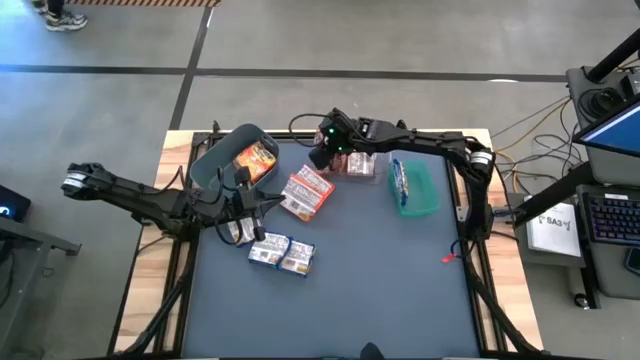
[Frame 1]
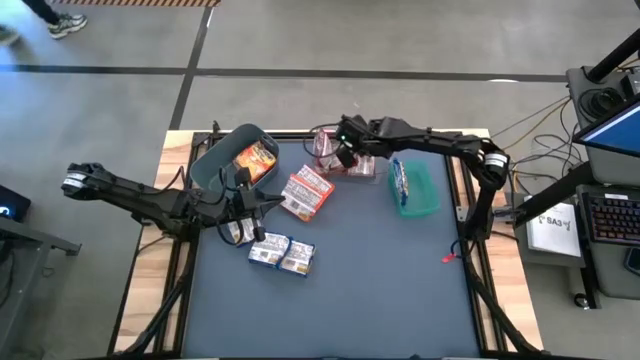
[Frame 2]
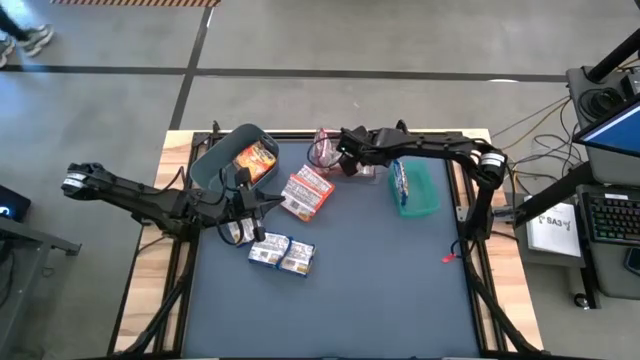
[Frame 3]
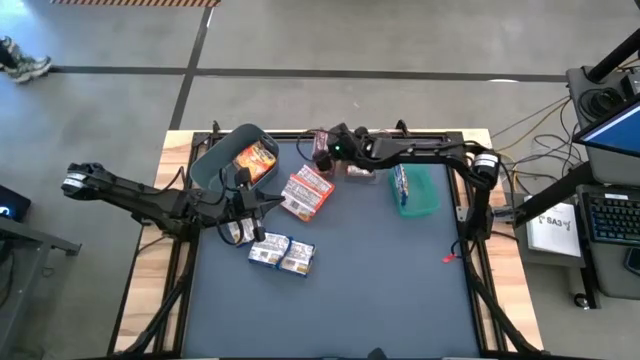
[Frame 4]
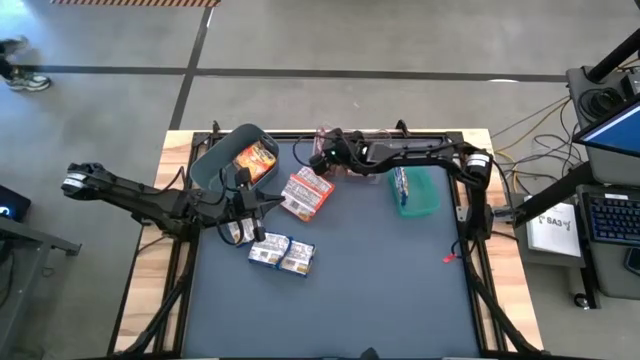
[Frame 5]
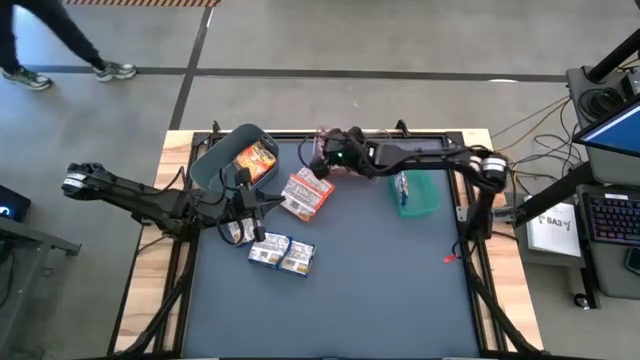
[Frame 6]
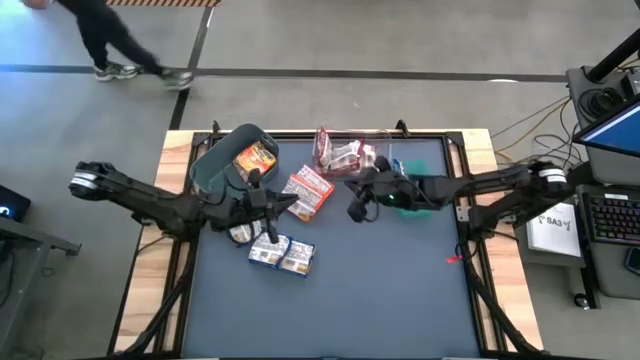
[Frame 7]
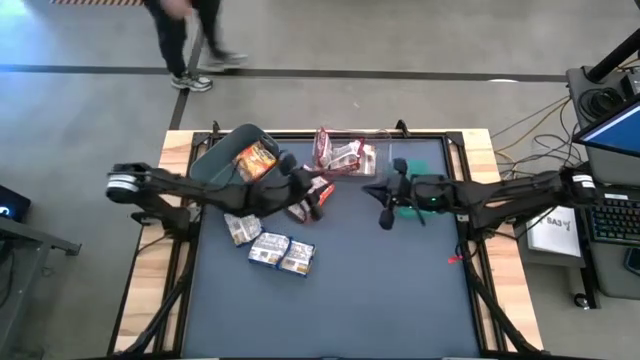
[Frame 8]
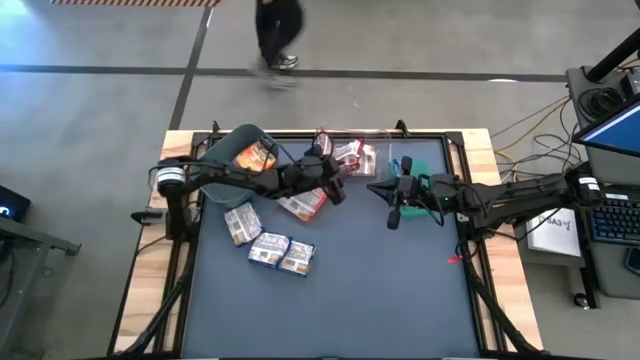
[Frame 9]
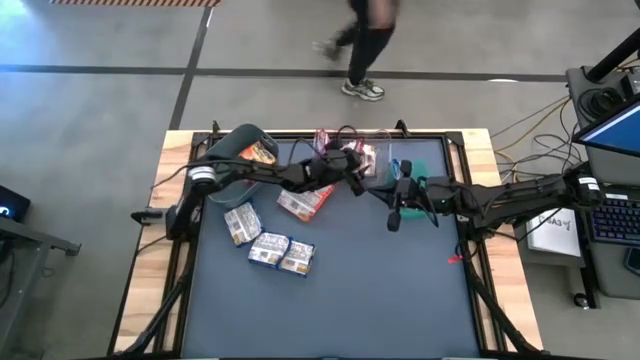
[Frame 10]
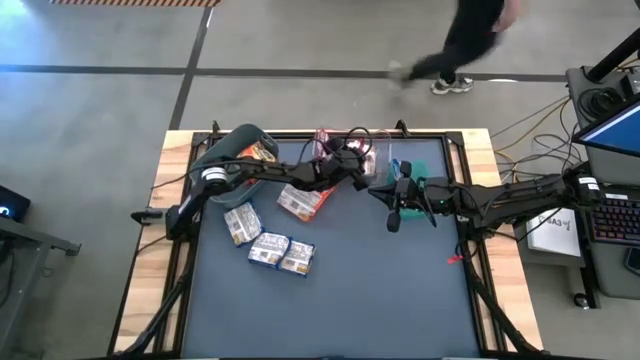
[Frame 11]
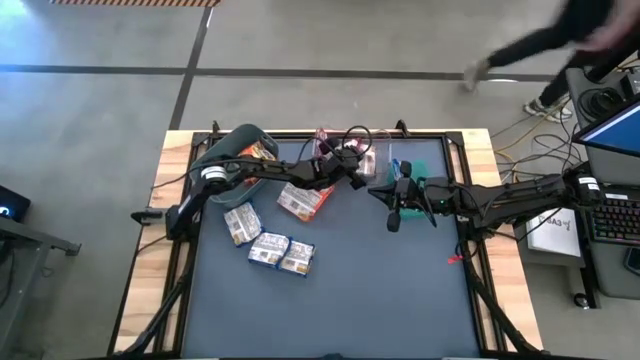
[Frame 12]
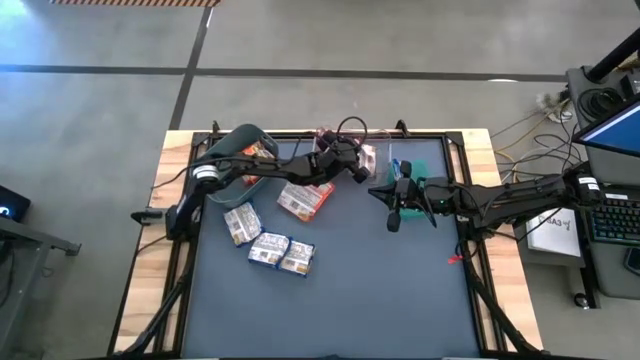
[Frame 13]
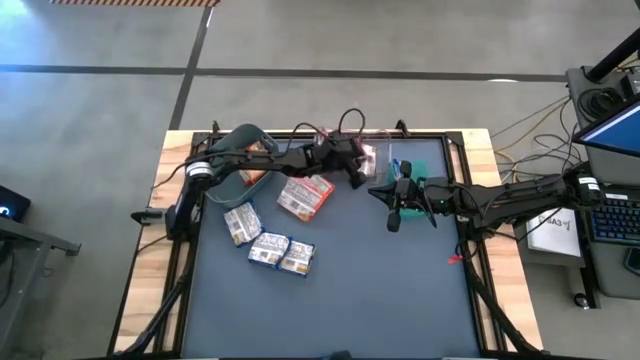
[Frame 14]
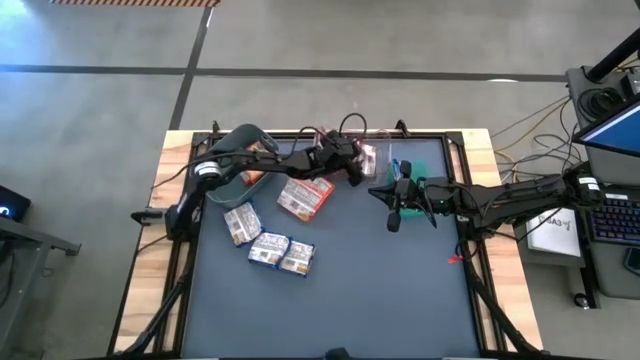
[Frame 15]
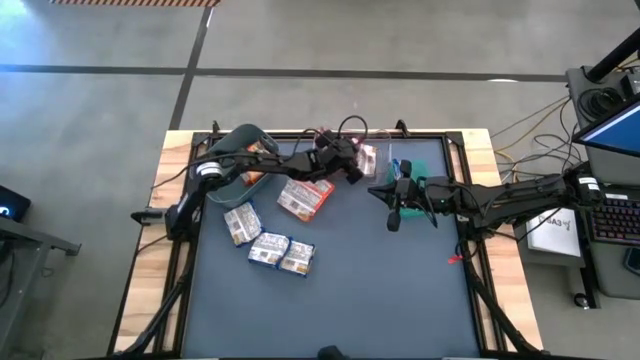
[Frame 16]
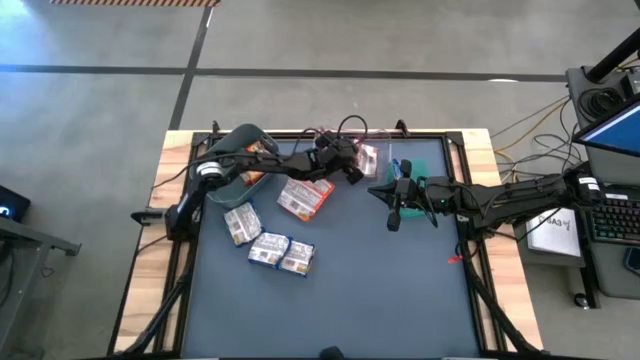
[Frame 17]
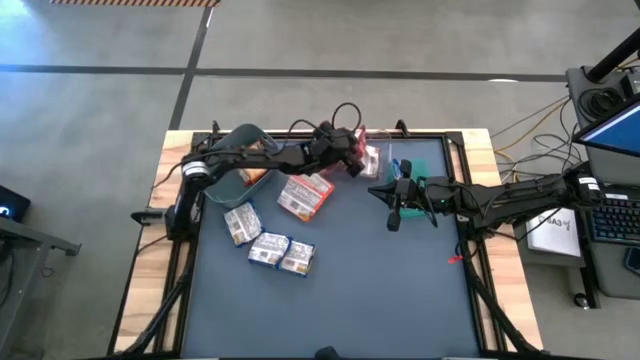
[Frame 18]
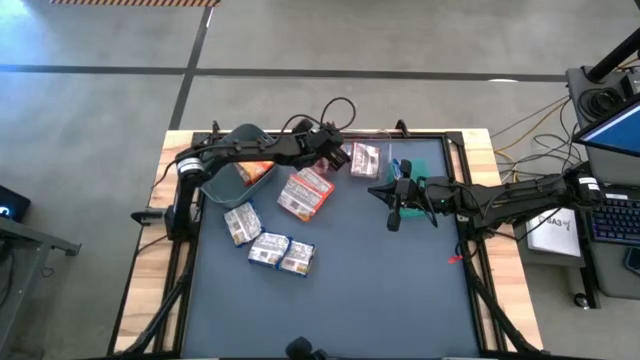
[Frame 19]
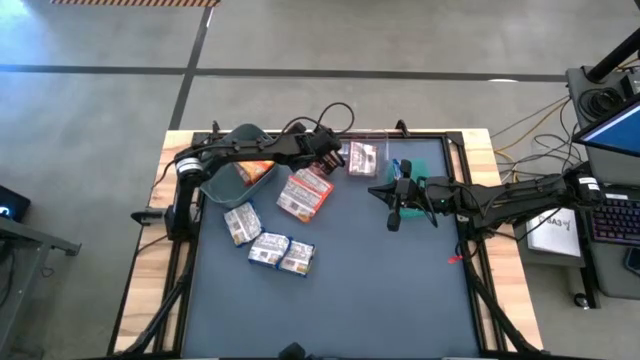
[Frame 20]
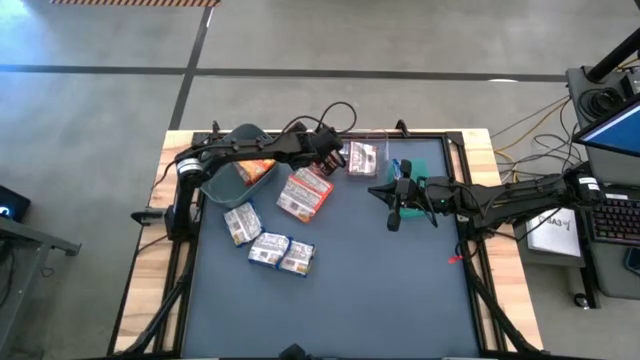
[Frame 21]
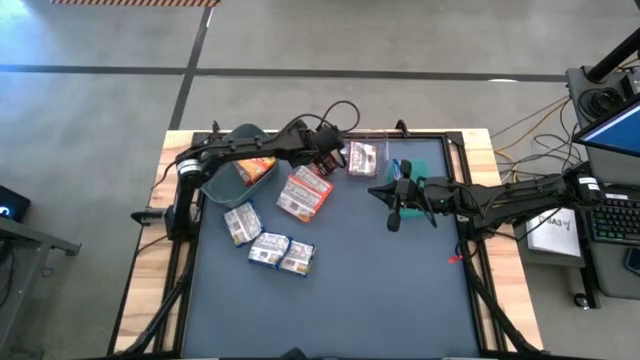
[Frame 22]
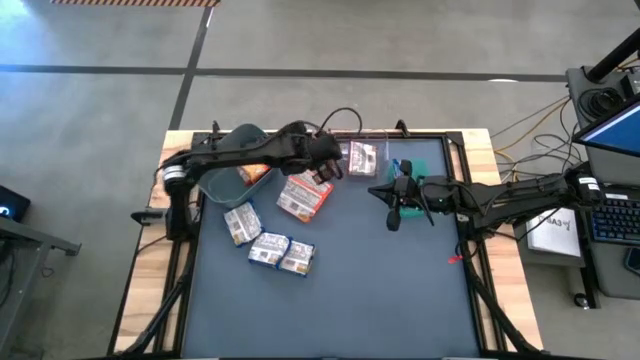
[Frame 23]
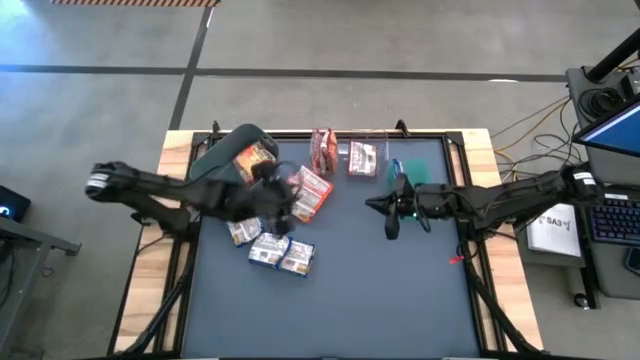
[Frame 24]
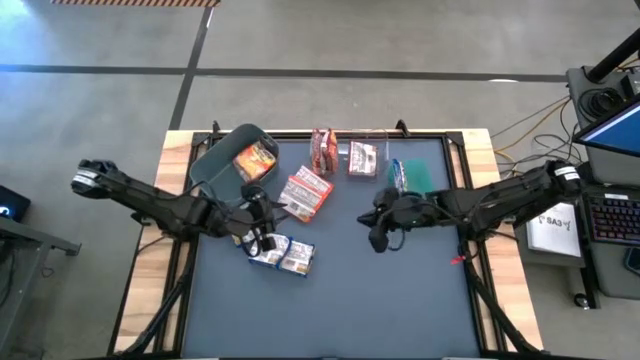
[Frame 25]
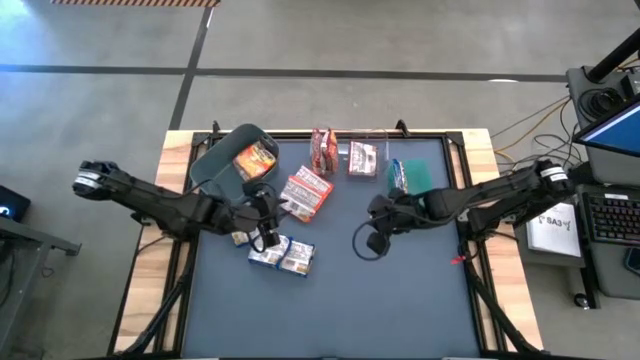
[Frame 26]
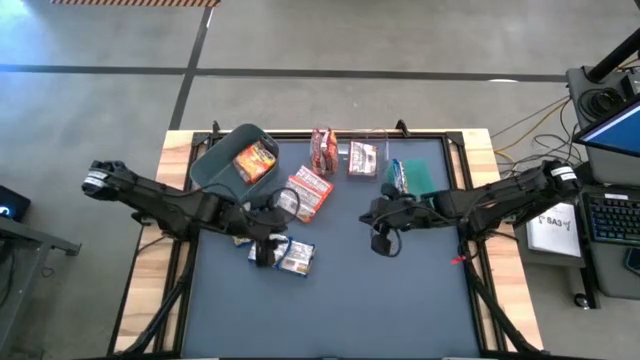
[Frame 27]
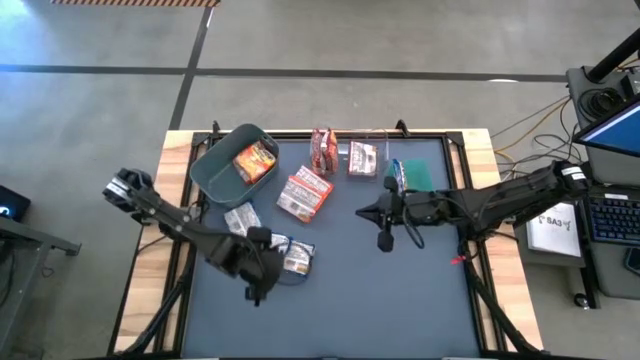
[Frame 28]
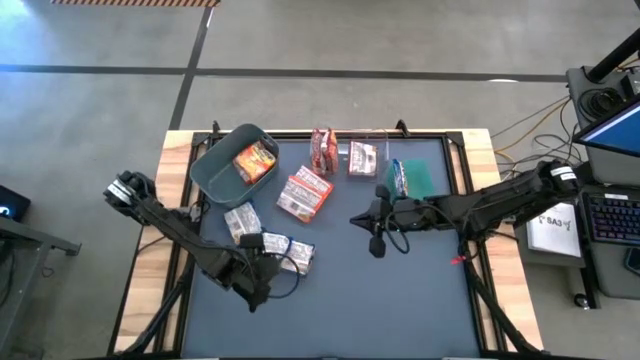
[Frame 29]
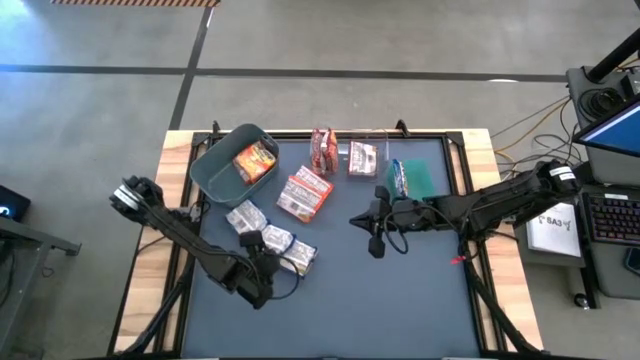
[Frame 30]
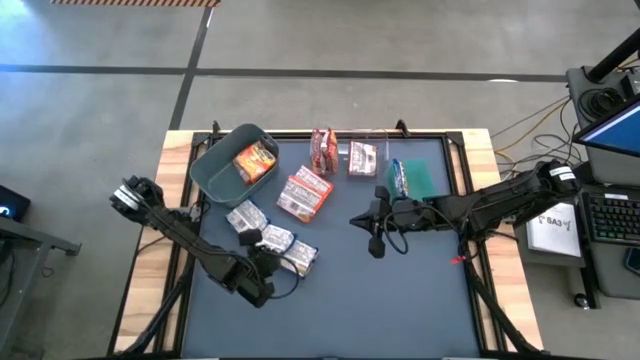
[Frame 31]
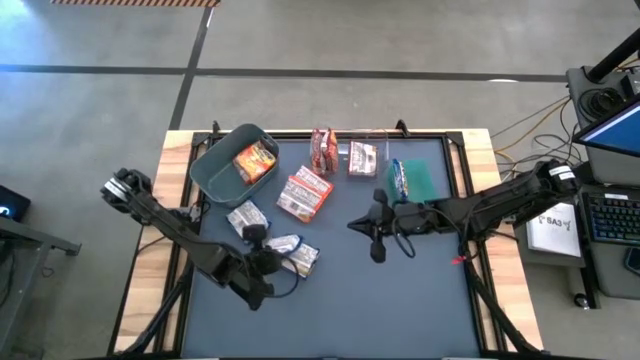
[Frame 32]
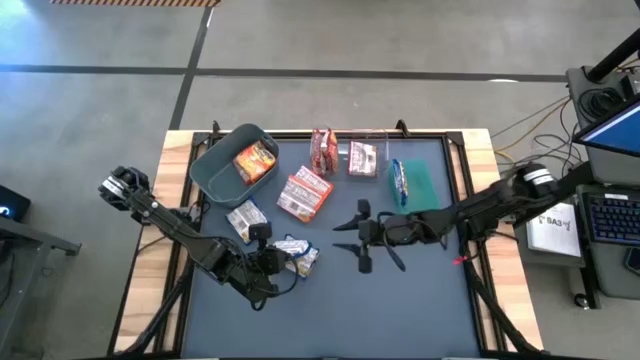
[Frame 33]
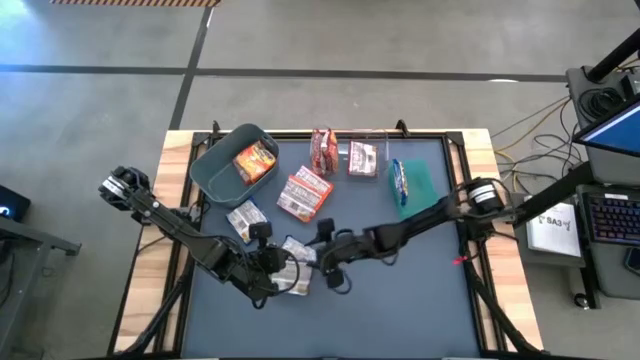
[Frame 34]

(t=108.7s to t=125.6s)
Task: Sort Maruchan noodles
Put the blue noodle pack into the green bin

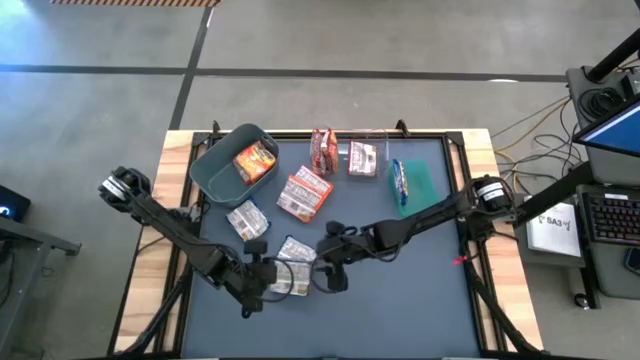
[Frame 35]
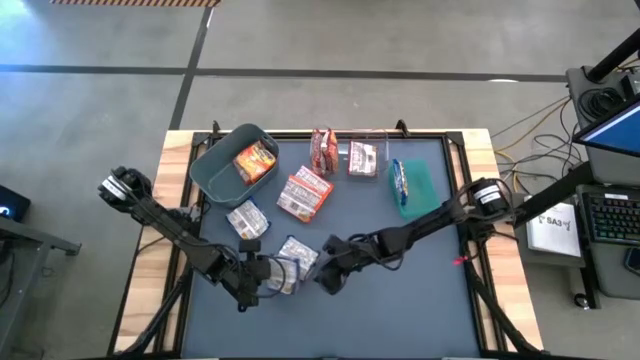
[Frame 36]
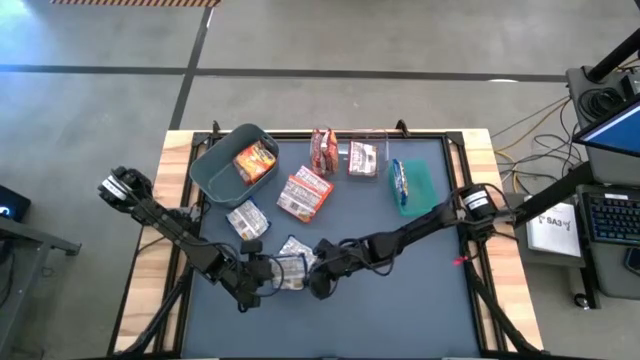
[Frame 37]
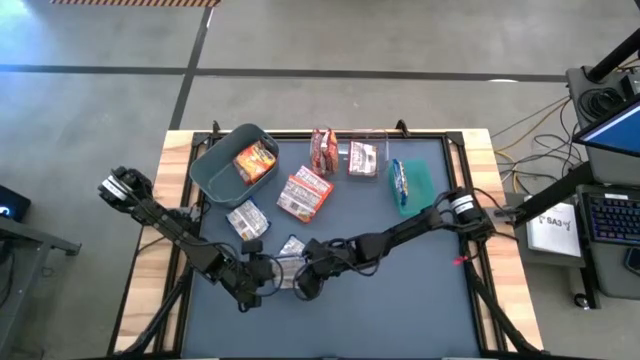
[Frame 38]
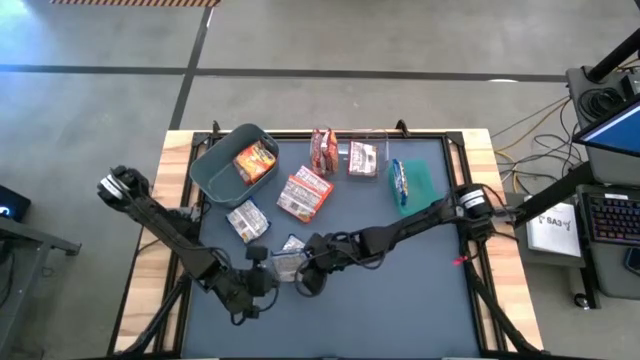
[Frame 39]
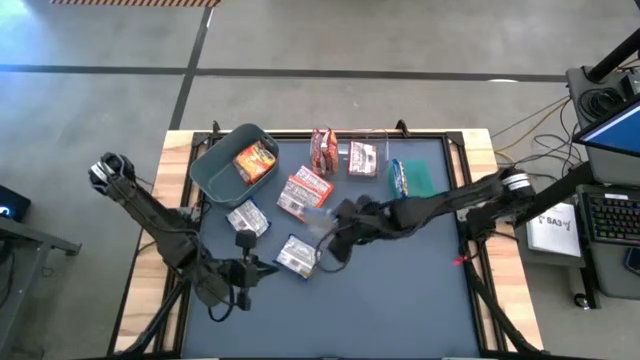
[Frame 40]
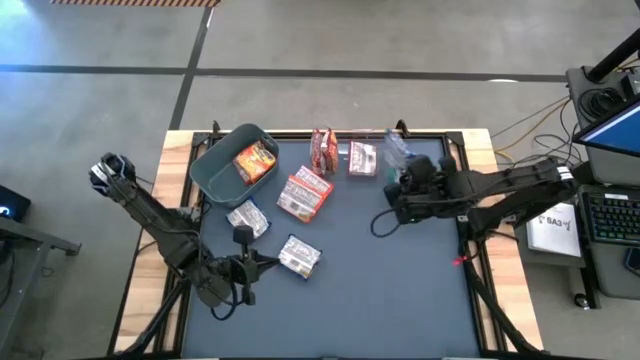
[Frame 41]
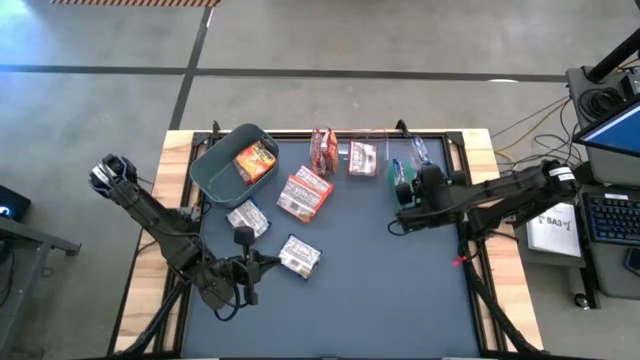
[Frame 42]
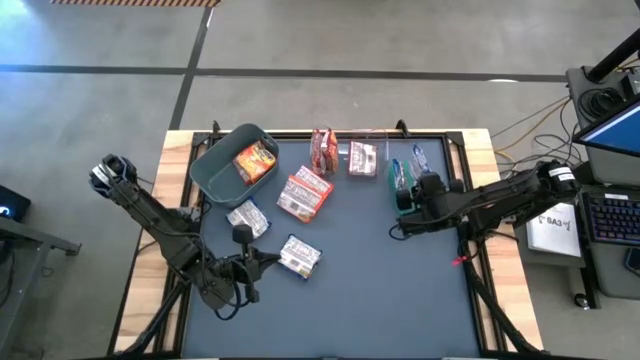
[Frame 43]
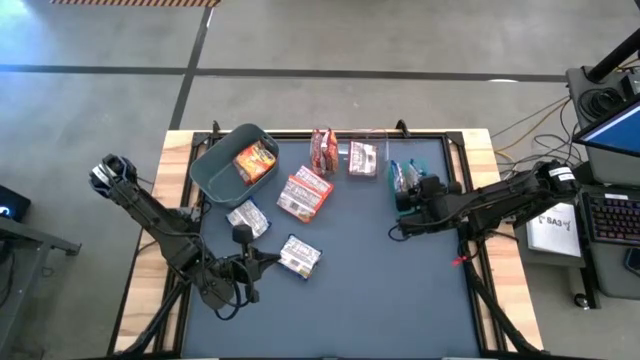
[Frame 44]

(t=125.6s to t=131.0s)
Put the blue noodle pack into the green bin
